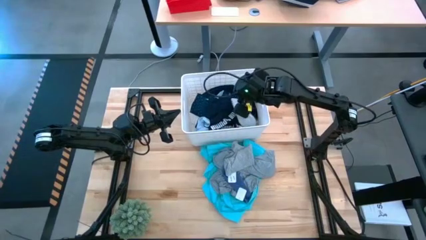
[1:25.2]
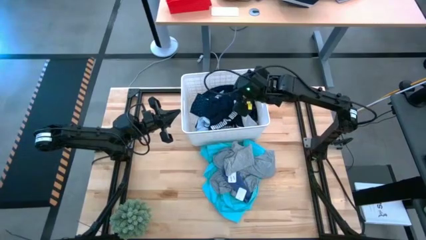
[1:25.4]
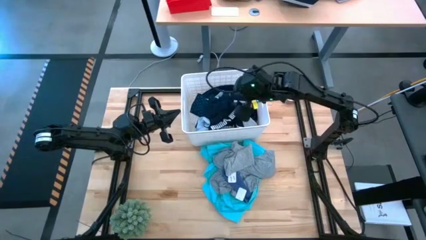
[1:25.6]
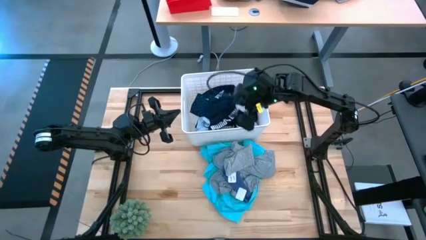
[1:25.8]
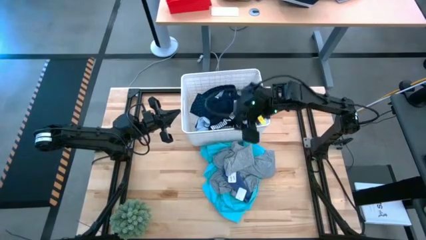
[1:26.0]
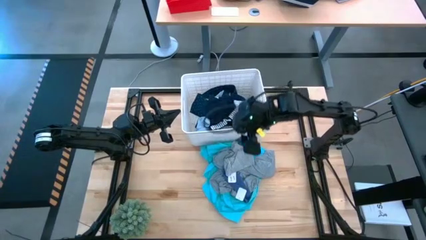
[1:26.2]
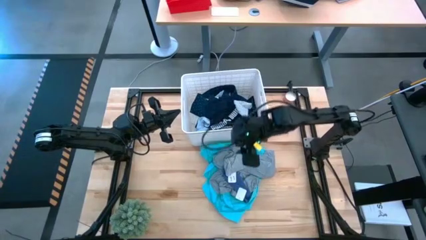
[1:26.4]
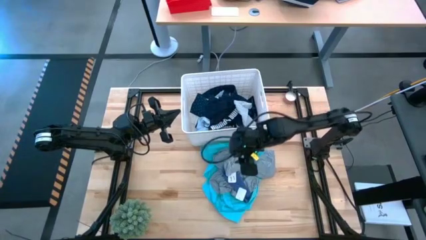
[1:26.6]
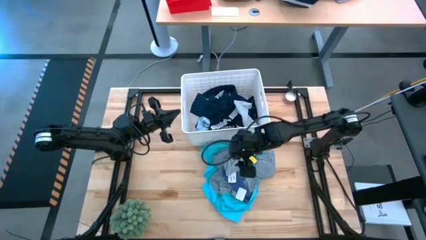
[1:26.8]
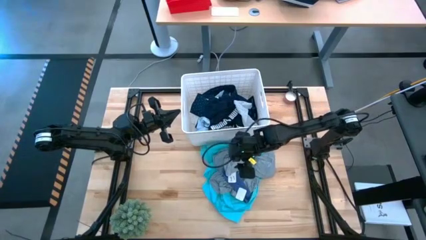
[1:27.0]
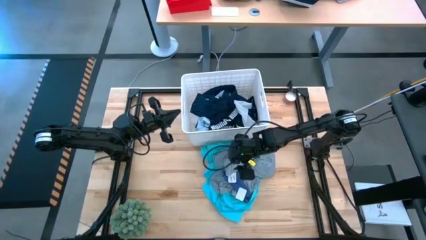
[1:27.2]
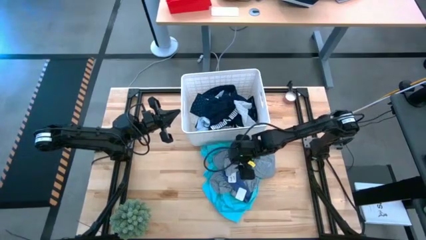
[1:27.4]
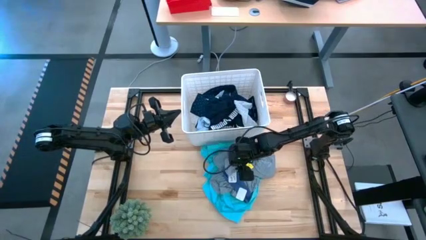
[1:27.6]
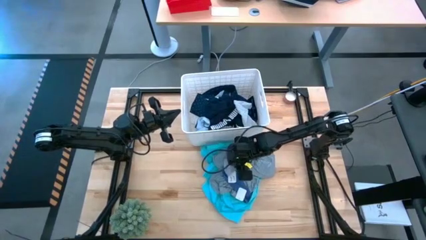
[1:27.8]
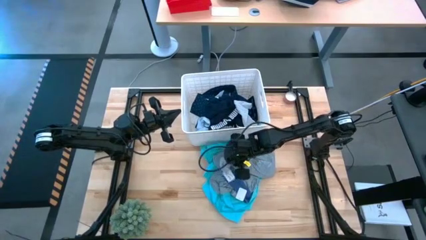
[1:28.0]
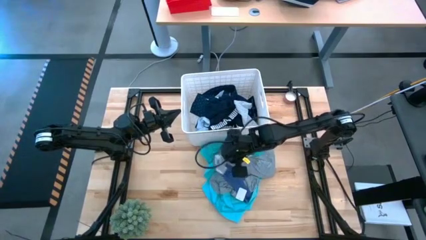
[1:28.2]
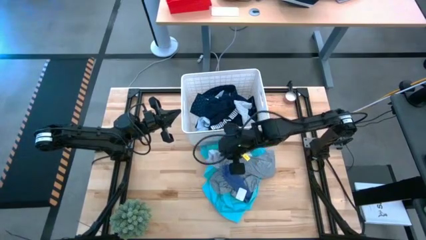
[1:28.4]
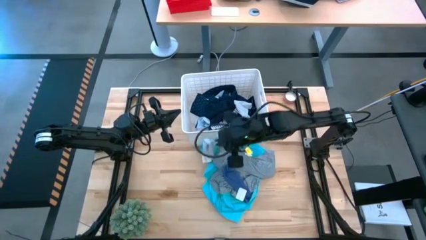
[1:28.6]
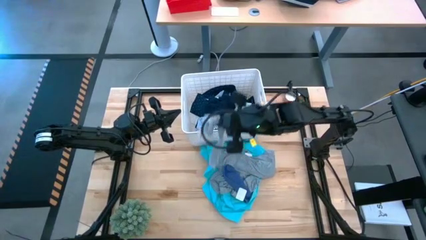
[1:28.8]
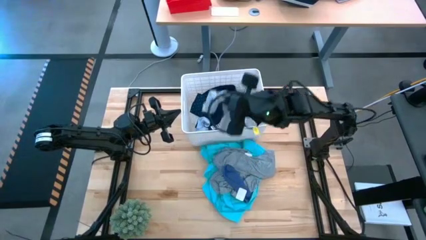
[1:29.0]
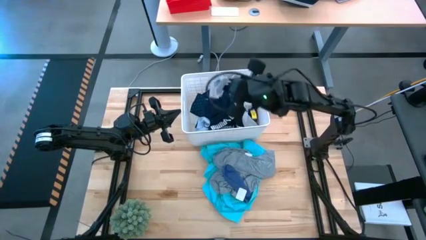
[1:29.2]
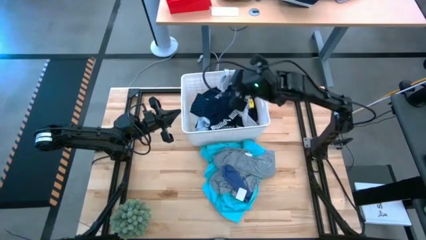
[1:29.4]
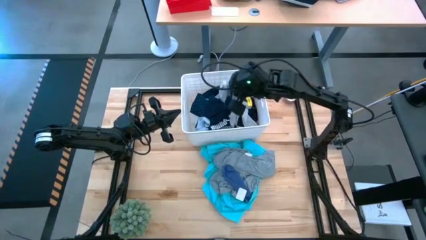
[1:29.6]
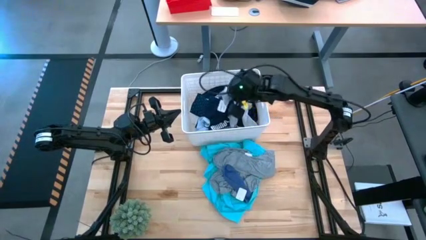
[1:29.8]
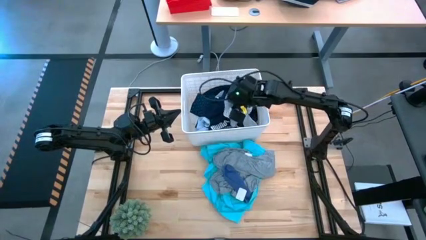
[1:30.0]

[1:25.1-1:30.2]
Task: Sort clothes
Put the gray socks into the white bin

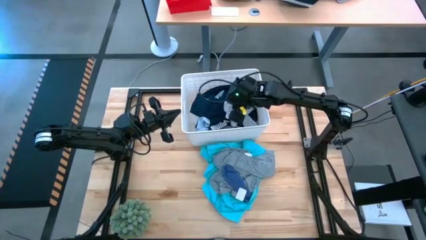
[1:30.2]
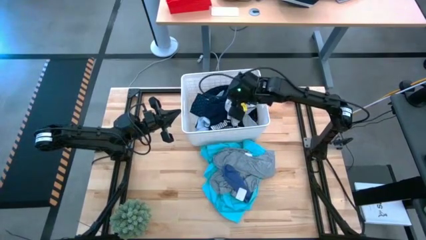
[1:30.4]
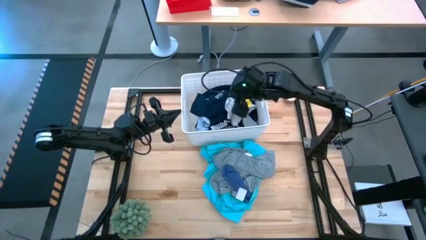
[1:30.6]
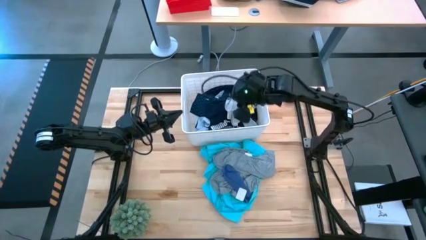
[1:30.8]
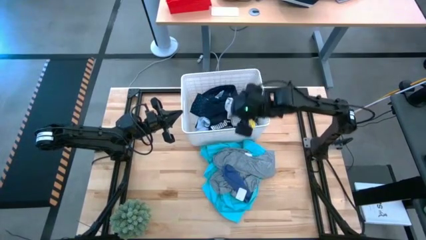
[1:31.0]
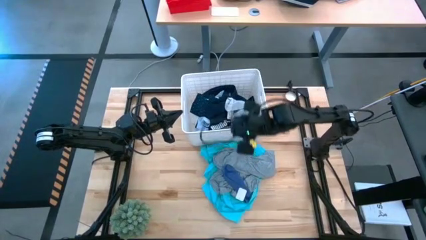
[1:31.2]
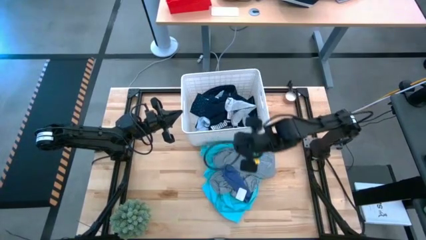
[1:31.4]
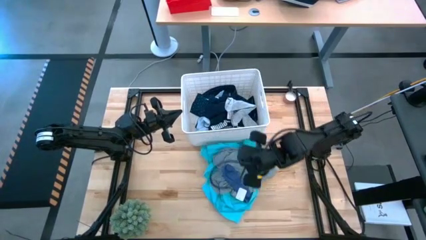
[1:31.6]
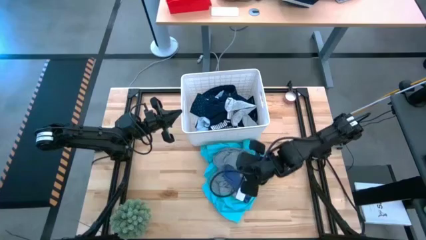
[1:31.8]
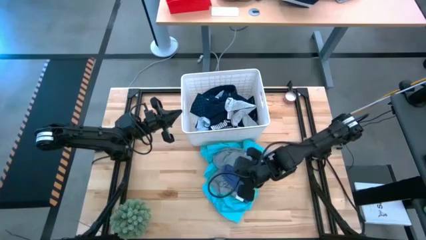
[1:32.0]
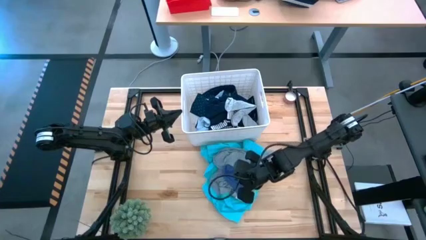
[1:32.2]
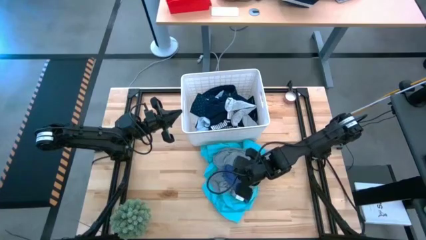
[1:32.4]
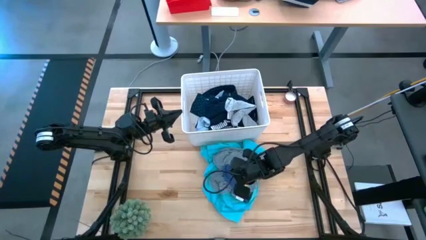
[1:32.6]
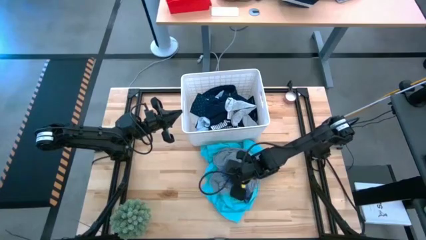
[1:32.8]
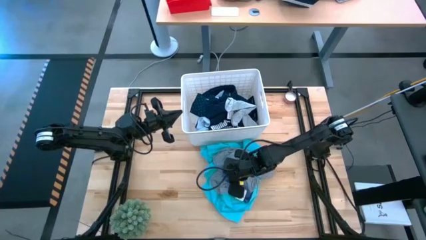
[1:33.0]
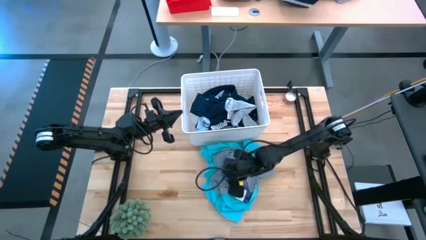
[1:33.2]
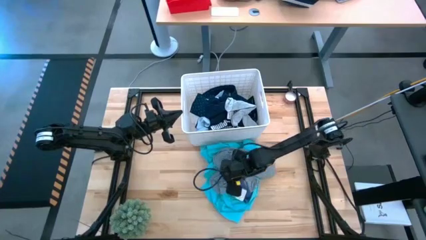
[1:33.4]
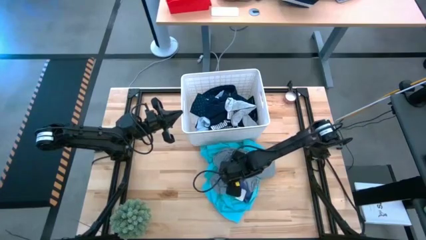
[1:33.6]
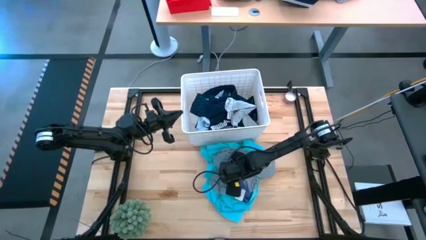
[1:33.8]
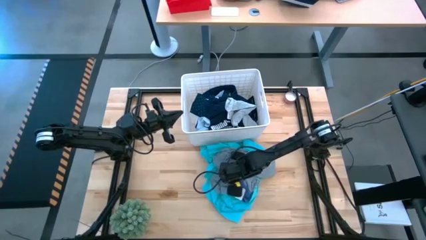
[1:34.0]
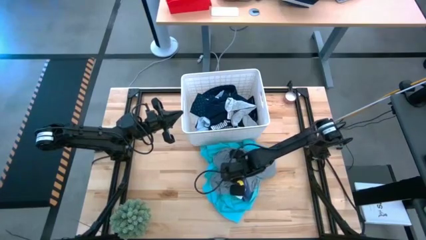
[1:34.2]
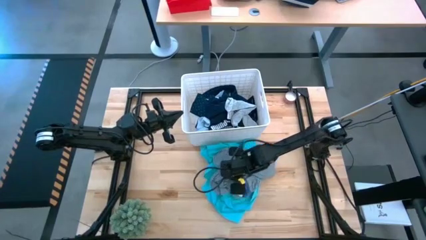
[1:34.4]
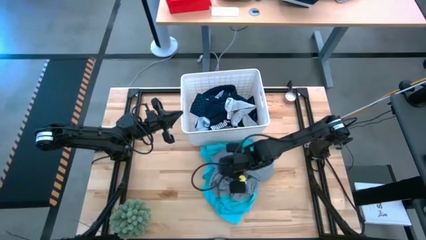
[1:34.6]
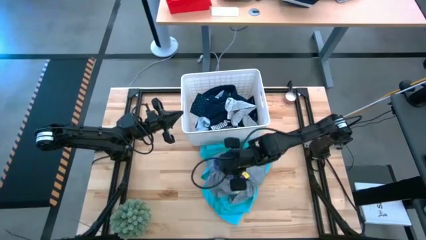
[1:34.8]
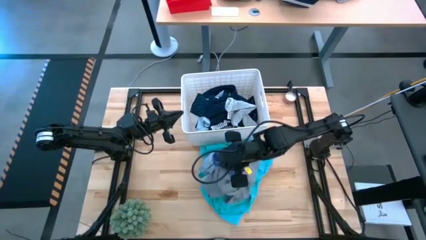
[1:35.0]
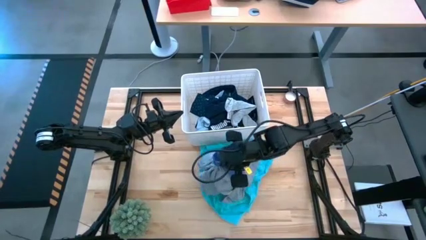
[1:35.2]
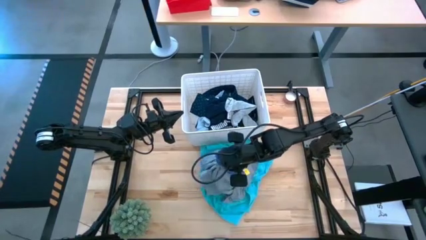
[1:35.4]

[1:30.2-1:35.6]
Put the blue socks into the white bin

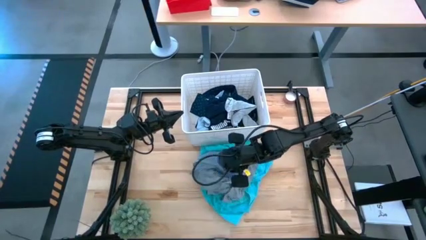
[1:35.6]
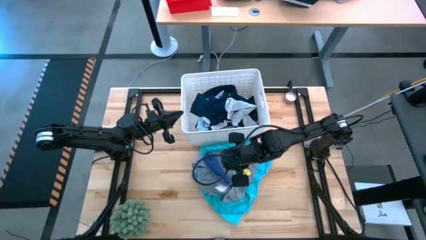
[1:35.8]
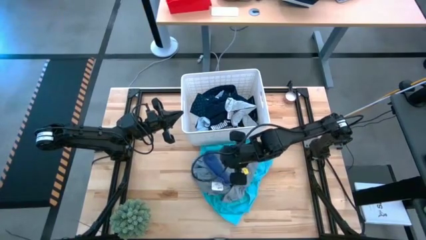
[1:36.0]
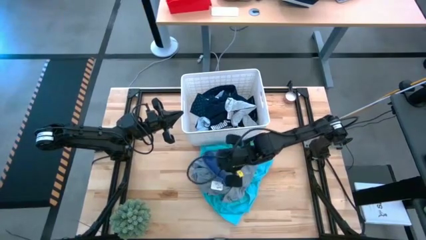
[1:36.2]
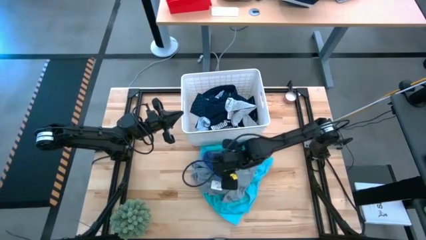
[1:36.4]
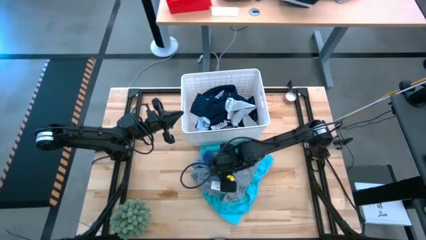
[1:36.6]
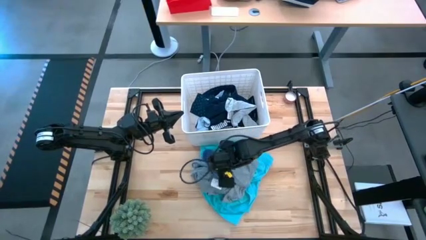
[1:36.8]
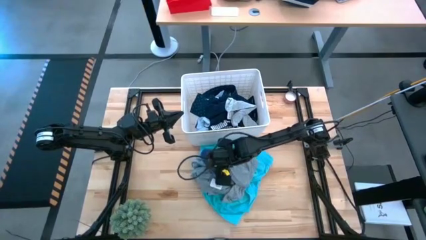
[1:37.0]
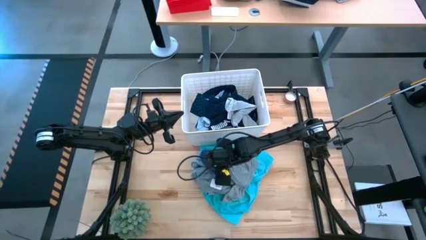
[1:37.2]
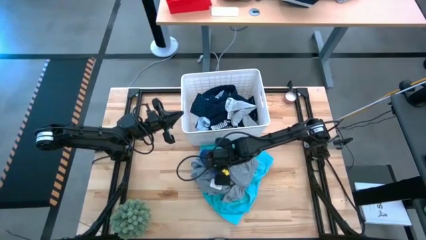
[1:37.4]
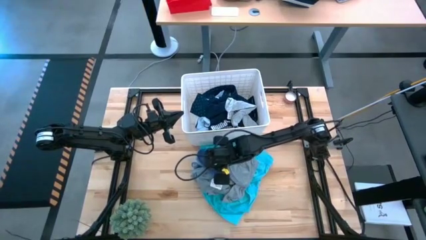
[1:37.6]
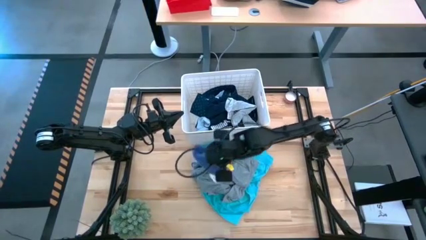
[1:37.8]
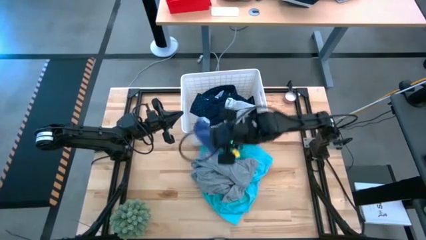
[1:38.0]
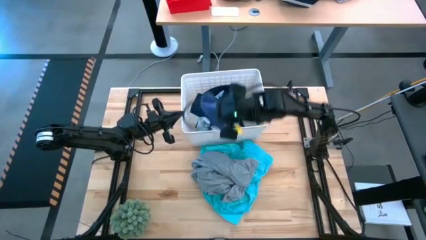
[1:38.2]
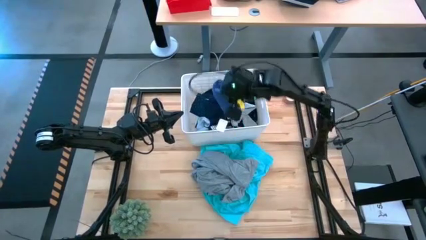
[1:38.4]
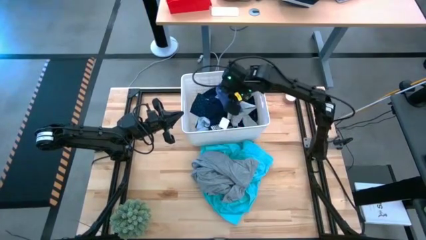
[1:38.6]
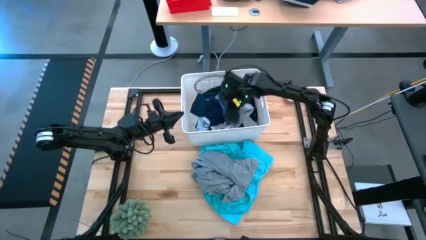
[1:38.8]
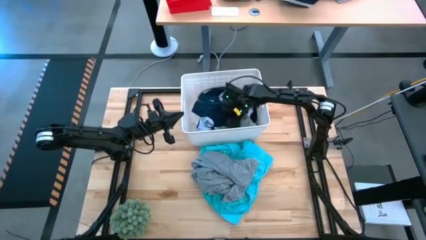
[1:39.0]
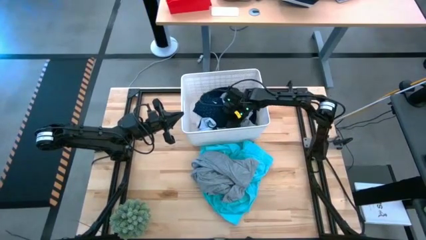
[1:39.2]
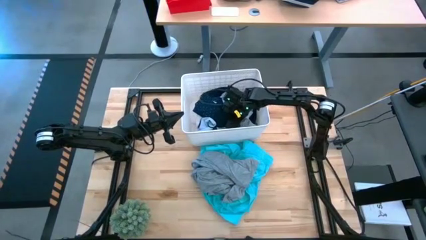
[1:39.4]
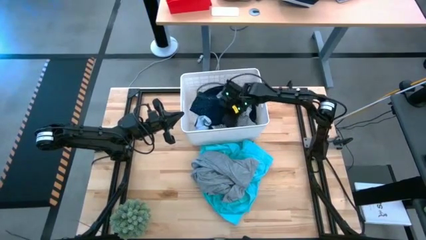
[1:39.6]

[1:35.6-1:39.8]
Put the blue socks into the white bin
